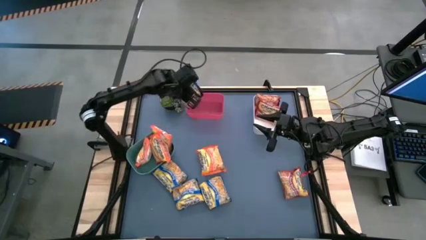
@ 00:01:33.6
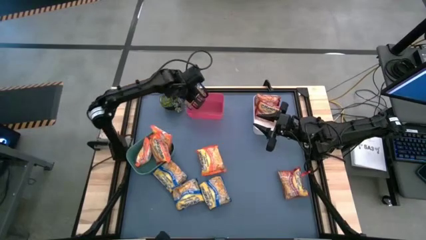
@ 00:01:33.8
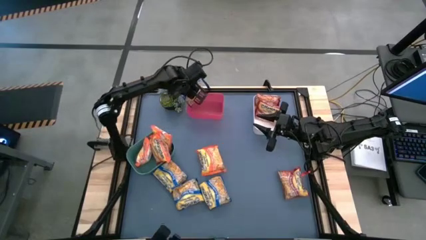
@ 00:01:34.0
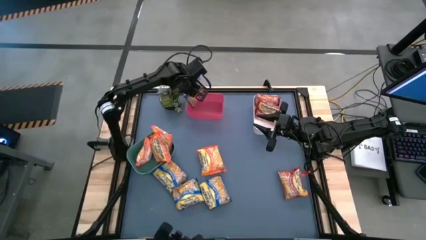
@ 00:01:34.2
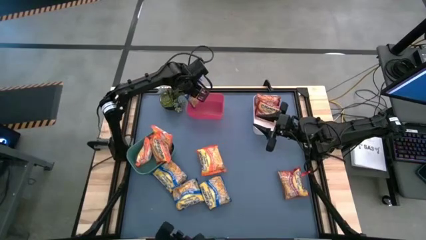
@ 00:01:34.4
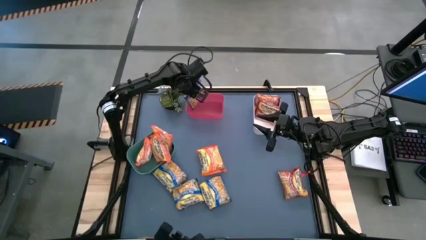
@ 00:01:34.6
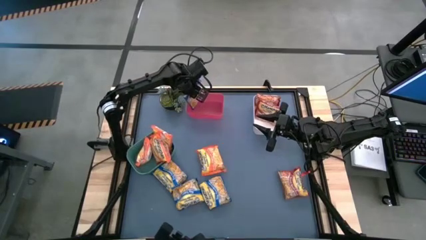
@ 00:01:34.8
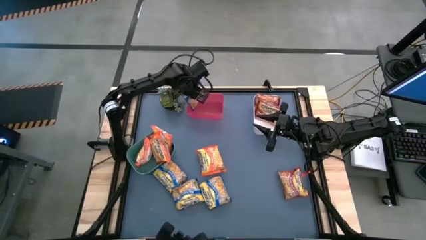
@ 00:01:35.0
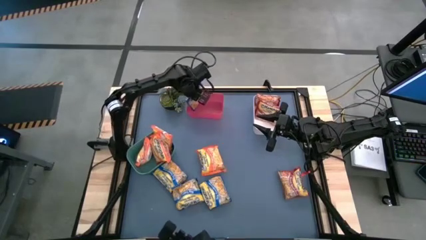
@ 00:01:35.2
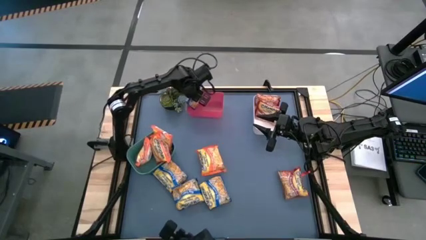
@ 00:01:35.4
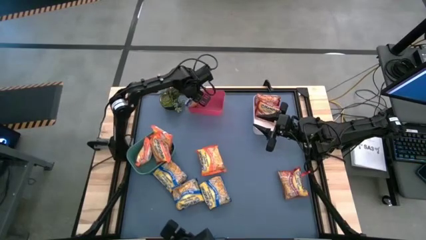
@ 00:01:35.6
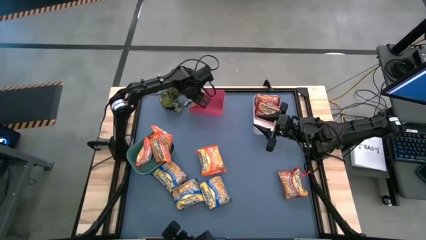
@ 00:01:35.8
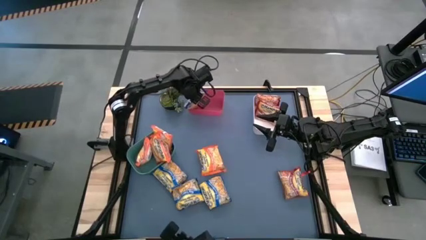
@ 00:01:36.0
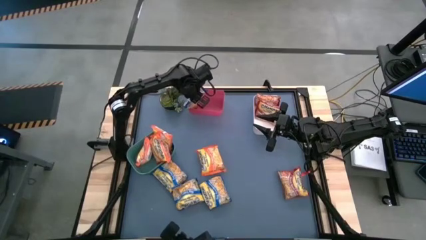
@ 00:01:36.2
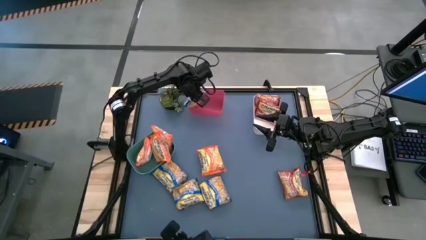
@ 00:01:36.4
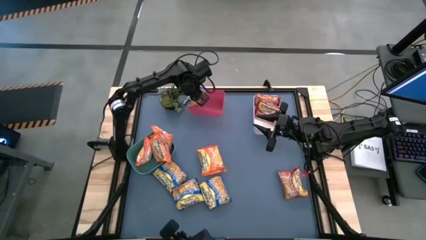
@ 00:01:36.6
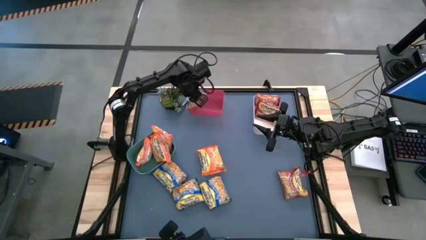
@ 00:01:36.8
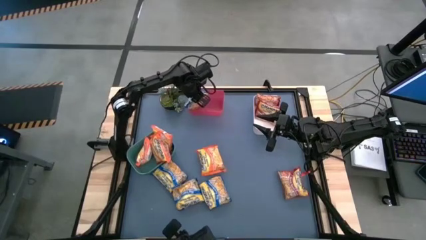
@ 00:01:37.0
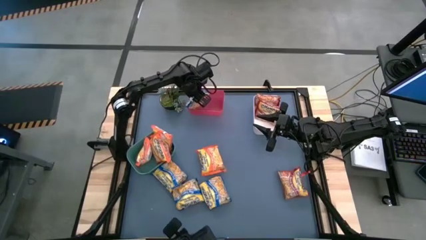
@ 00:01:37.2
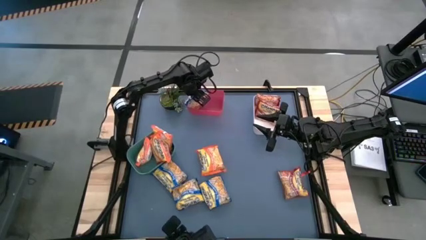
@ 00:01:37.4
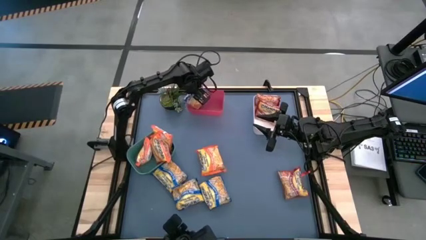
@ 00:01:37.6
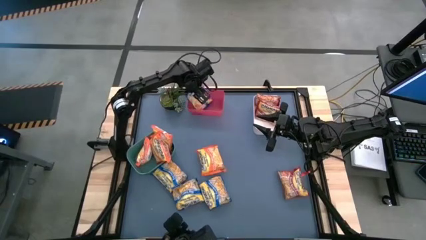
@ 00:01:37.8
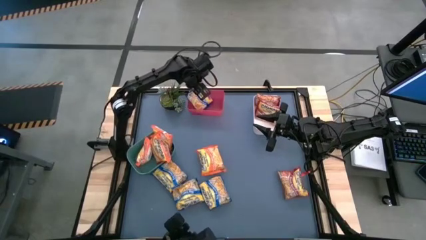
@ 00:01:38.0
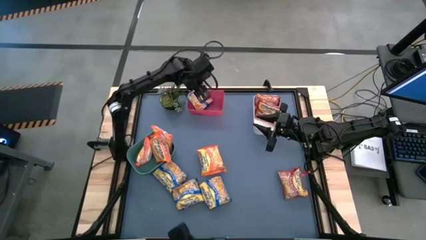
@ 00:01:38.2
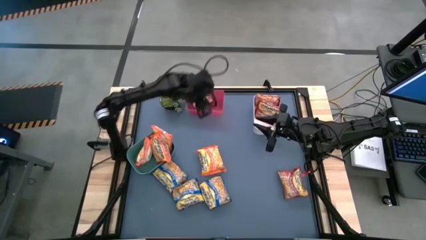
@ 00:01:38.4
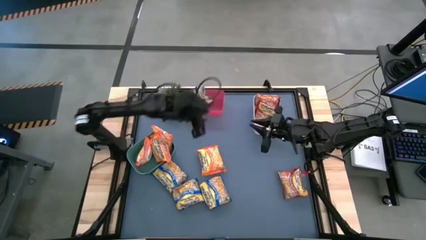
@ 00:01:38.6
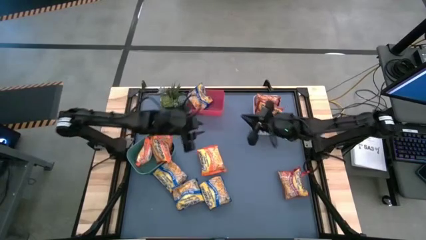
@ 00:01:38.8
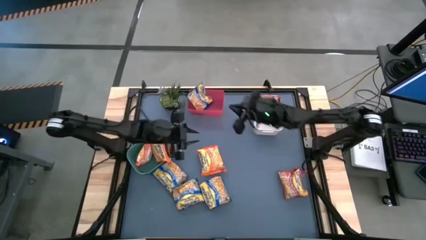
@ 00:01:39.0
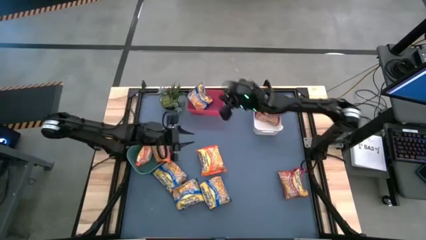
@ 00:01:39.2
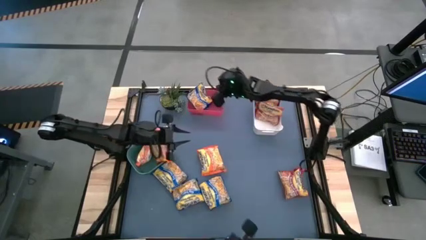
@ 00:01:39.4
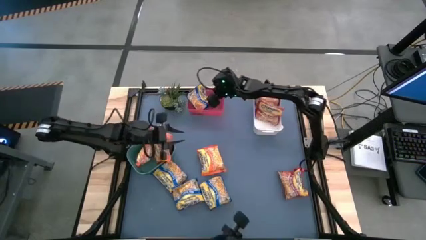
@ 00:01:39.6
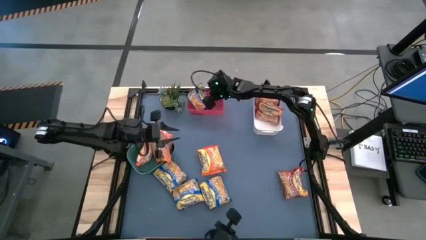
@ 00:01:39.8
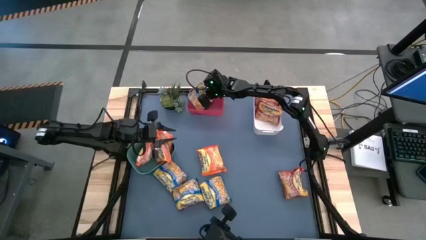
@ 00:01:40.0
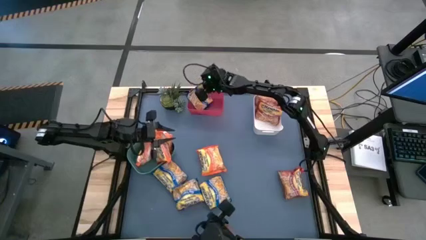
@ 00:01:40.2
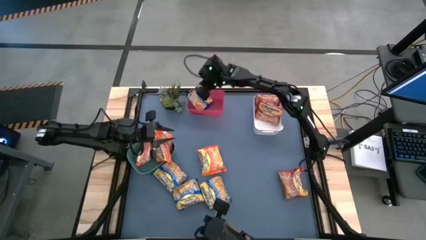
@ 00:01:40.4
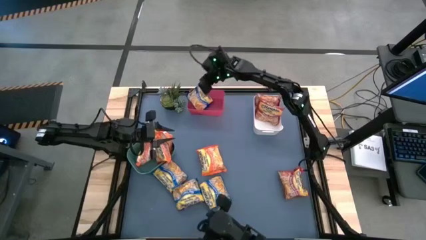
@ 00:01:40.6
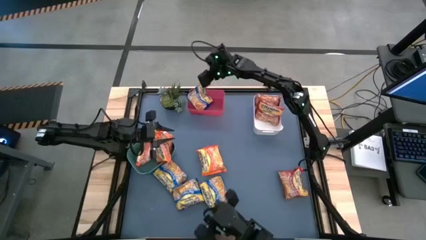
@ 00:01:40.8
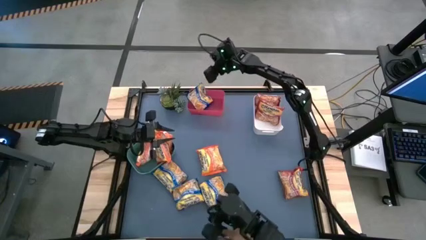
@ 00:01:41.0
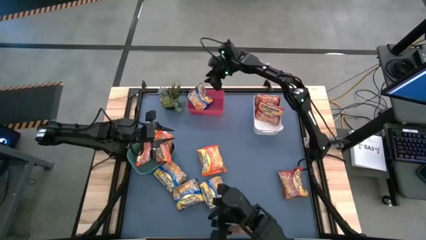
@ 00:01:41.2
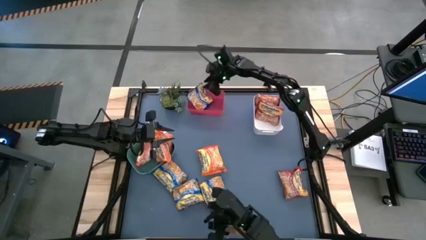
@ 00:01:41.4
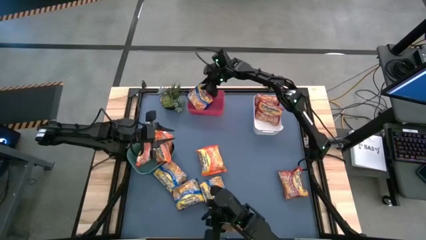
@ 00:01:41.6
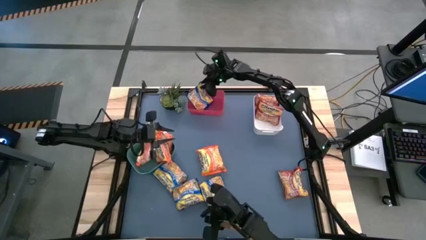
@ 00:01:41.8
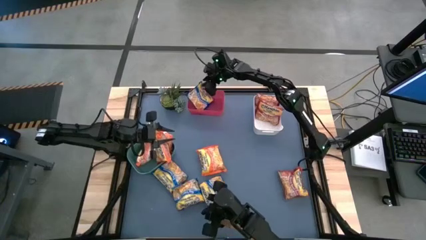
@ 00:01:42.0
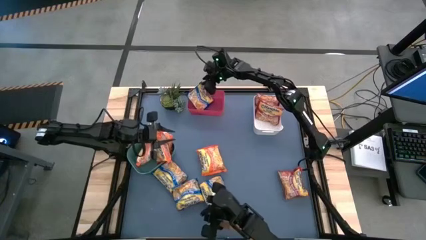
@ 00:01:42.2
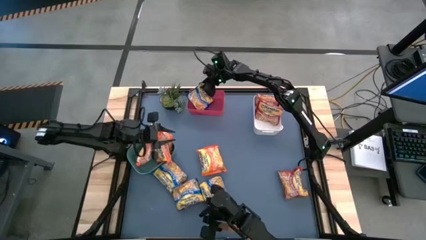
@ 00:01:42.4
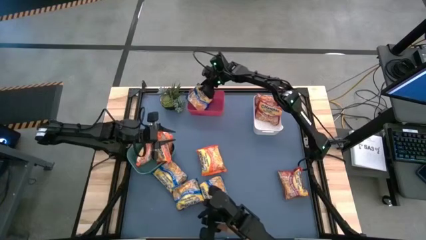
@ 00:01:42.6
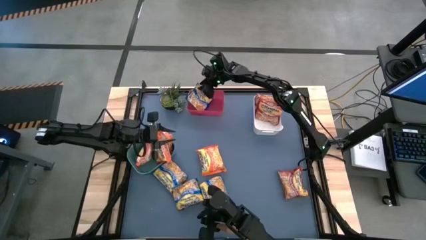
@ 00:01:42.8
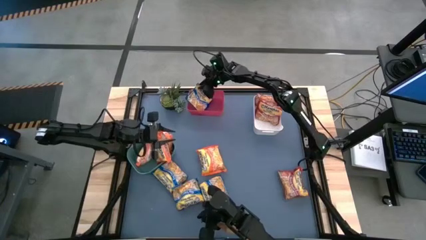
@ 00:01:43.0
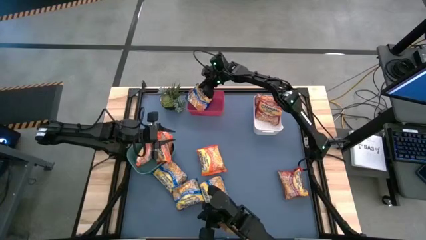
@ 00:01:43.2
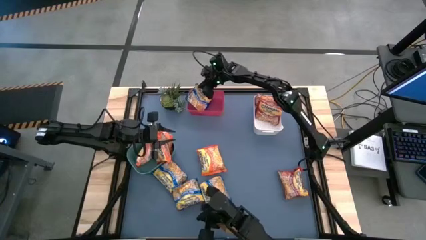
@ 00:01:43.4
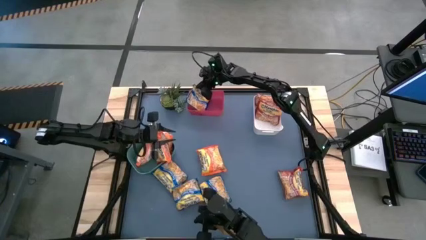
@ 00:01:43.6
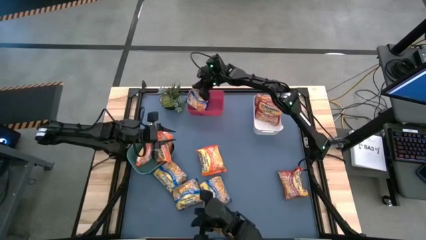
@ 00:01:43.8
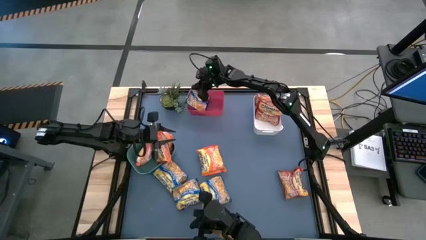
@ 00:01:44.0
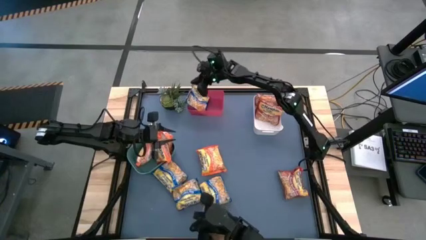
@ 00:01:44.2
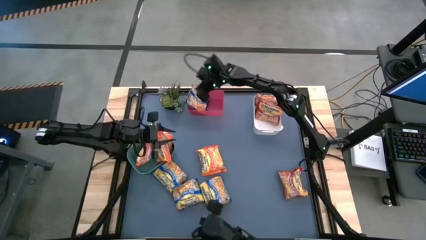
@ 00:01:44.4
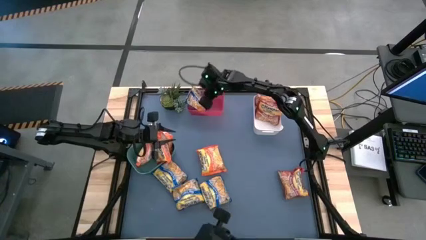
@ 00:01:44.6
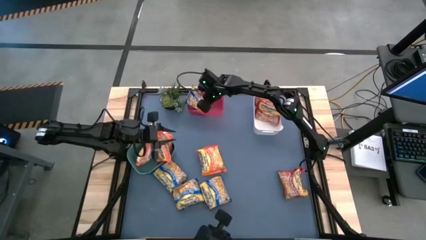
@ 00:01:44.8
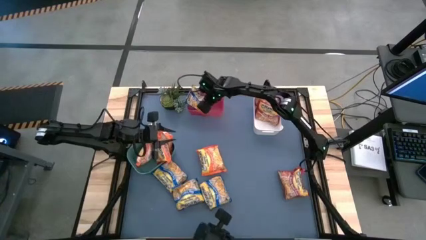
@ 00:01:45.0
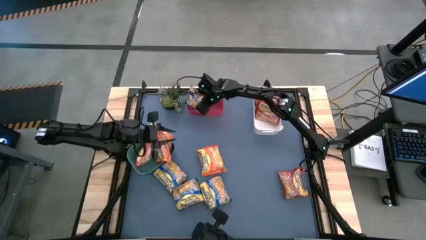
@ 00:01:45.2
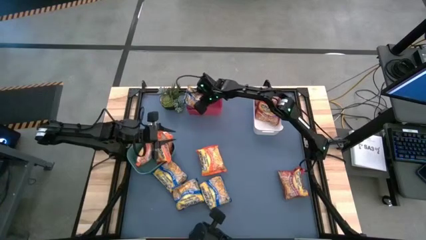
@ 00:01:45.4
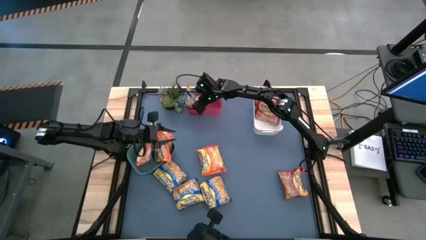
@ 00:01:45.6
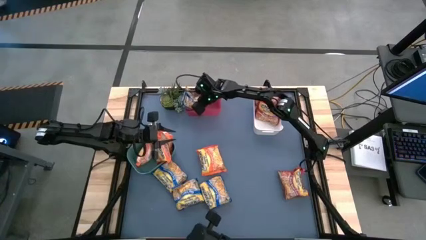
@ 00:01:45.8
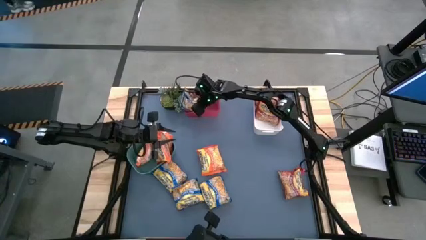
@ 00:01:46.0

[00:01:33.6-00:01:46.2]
Task: Sort Maruchan noodles
Put the blue noodle pack into the red bin

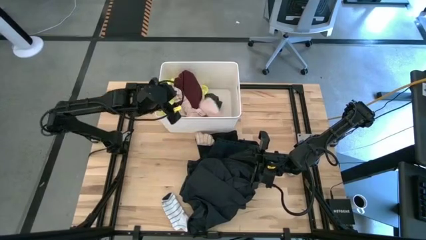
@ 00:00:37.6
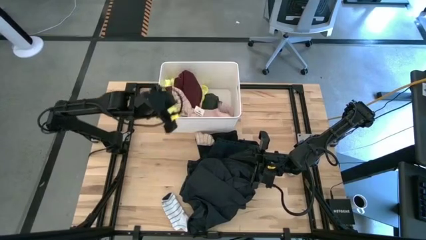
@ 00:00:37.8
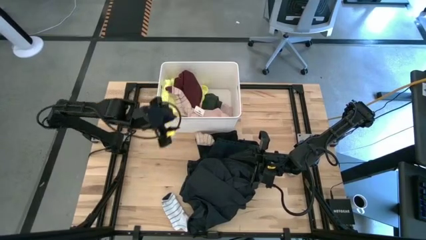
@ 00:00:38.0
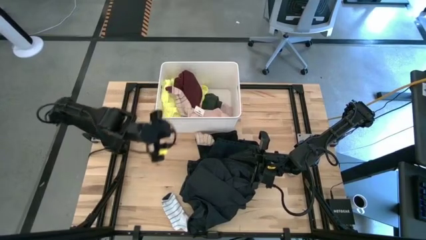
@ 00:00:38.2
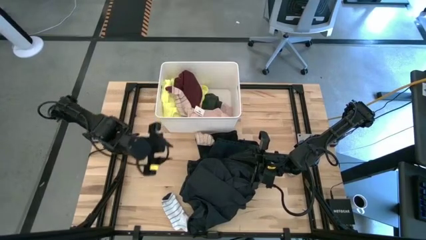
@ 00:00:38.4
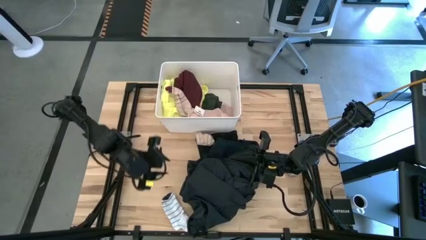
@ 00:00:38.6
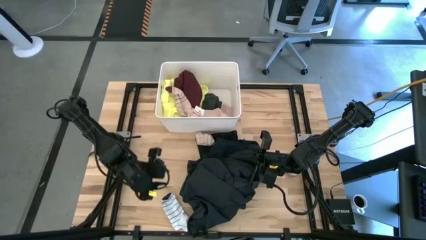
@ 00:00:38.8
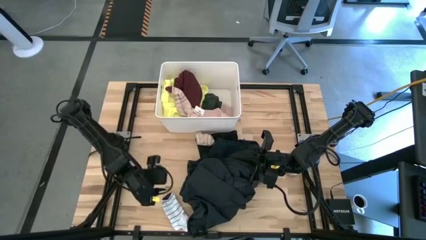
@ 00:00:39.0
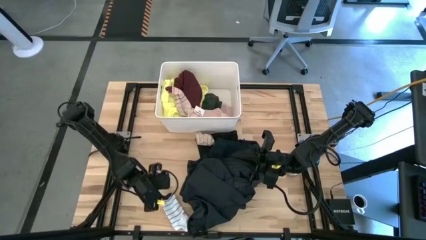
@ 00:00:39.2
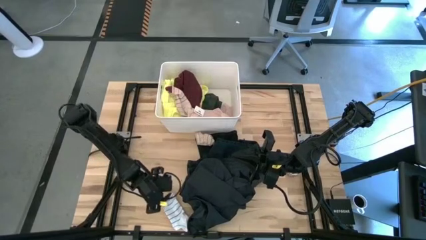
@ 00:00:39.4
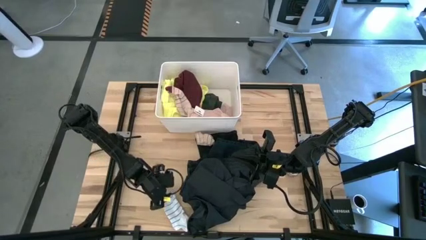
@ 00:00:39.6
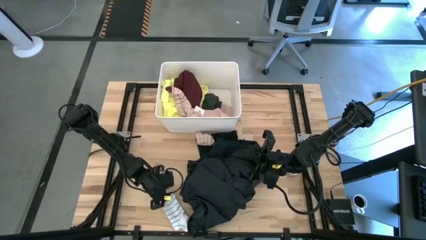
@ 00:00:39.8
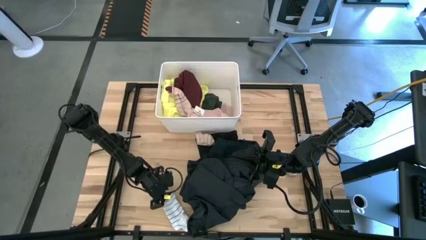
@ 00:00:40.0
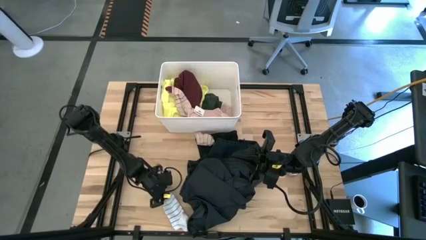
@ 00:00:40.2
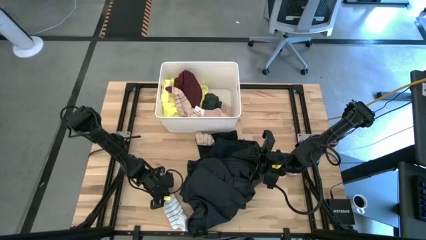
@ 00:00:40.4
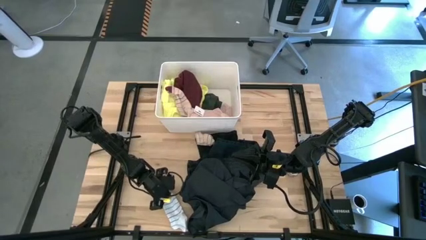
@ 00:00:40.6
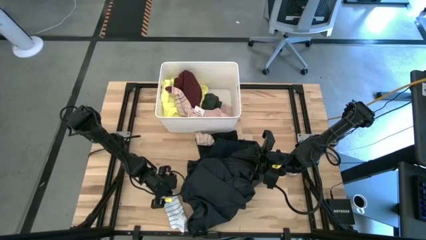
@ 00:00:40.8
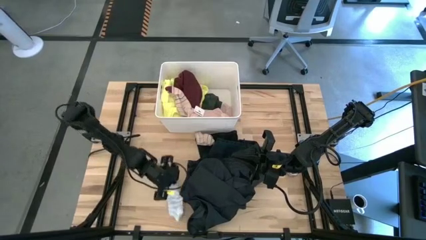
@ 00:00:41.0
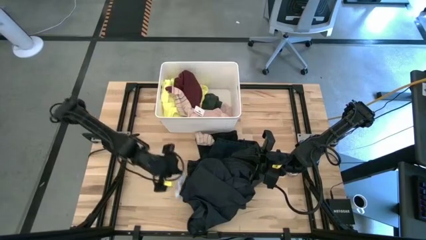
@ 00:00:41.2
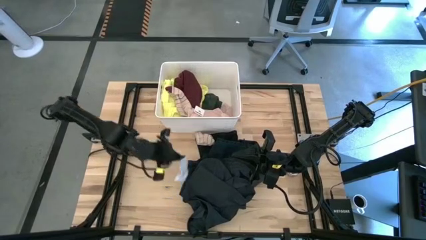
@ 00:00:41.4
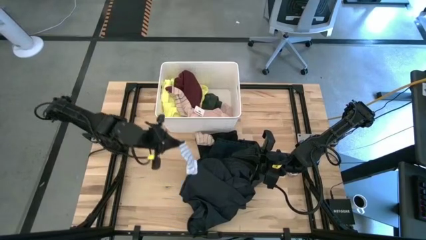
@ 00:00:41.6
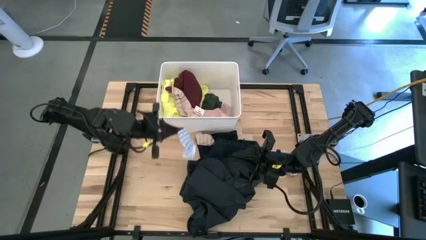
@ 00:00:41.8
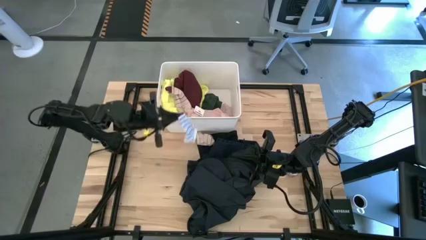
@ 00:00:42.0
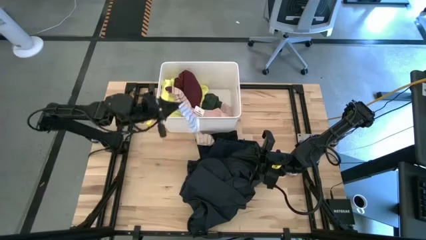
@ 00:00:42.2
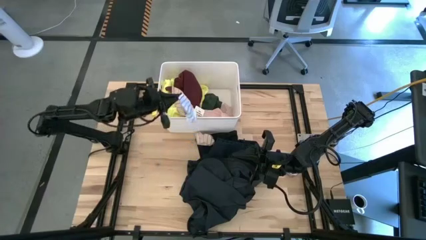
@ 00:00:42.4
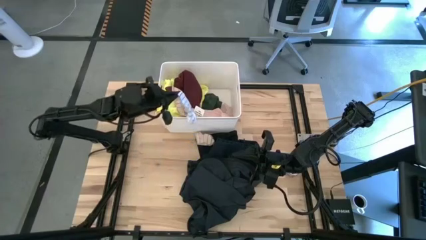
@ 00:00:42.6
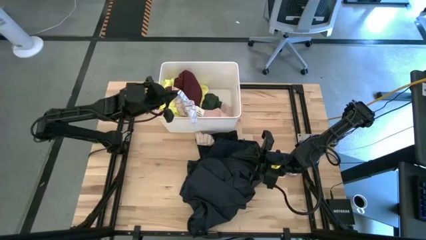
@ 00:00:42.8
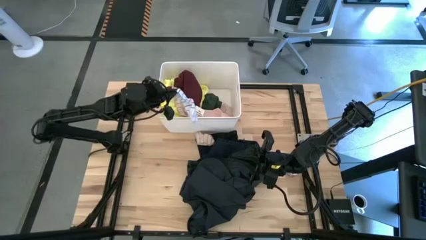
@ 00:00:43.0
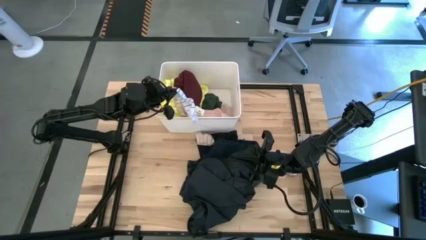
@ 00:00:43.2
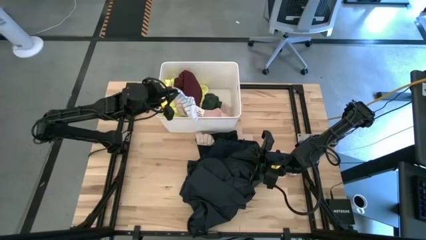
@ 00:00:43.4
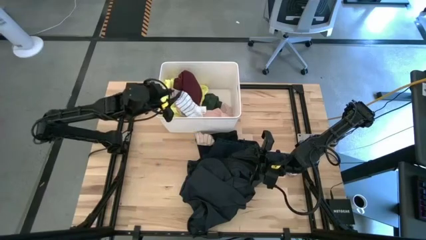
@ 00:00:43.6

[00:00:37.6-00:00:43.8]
Task: Sort clothes
Put the blue sock into the white laundry organizer
